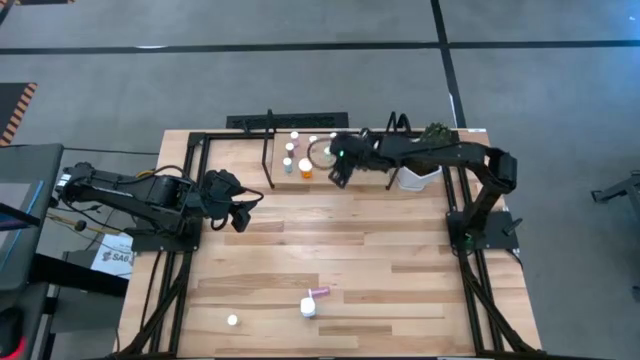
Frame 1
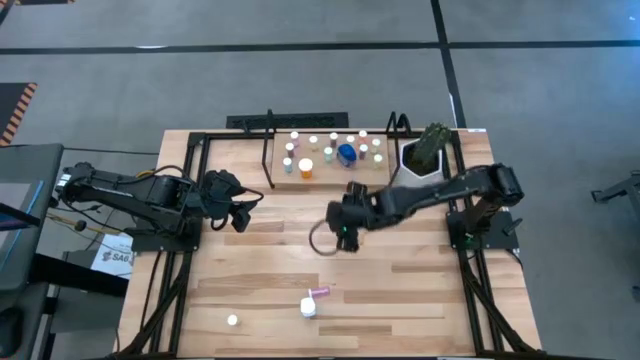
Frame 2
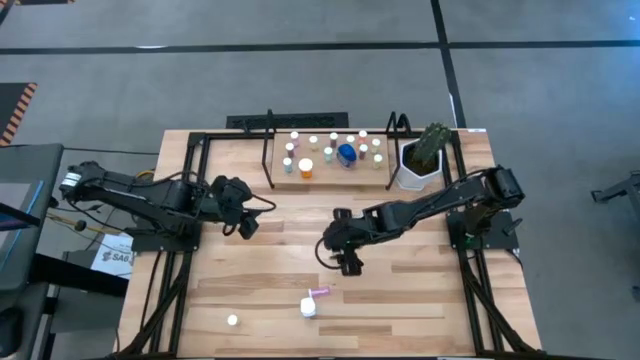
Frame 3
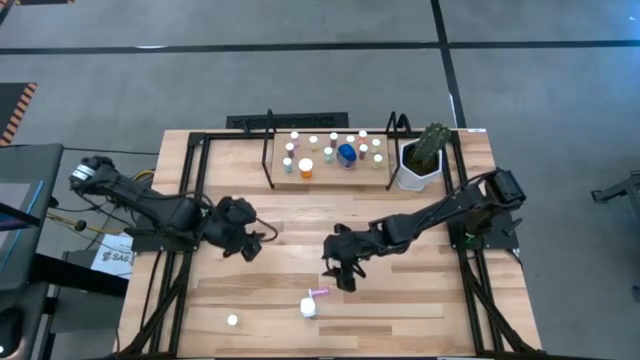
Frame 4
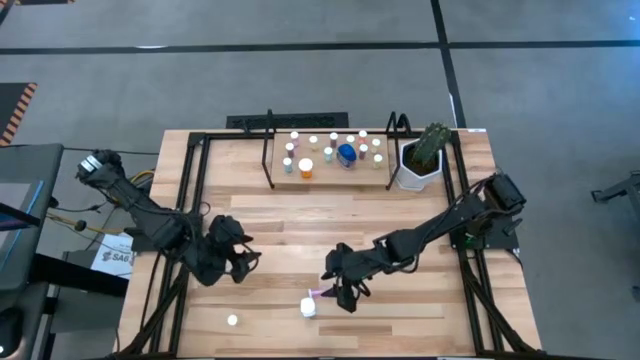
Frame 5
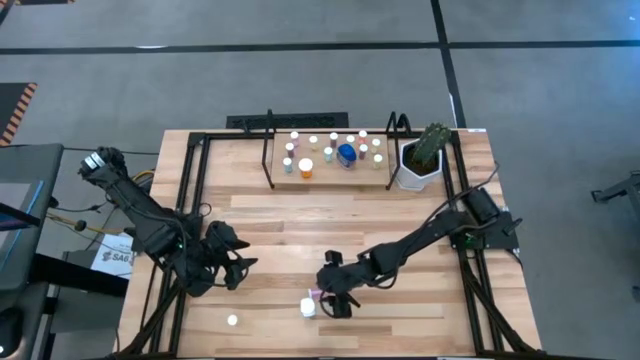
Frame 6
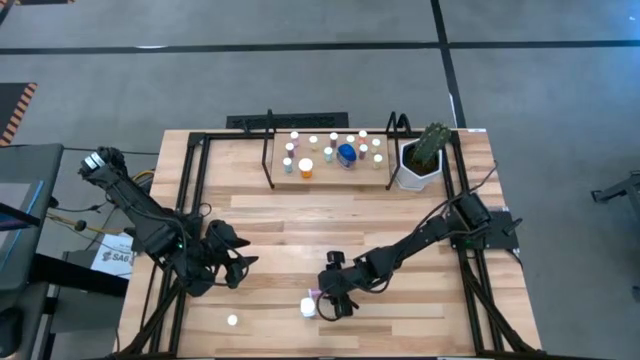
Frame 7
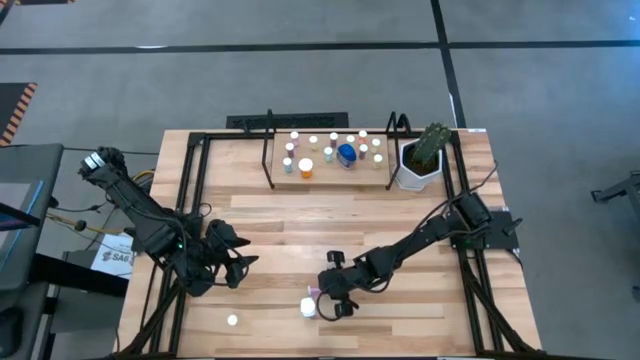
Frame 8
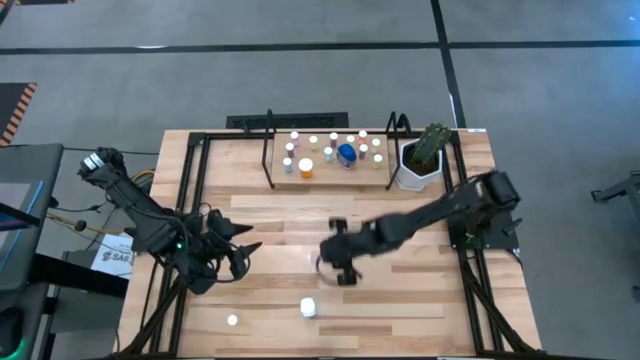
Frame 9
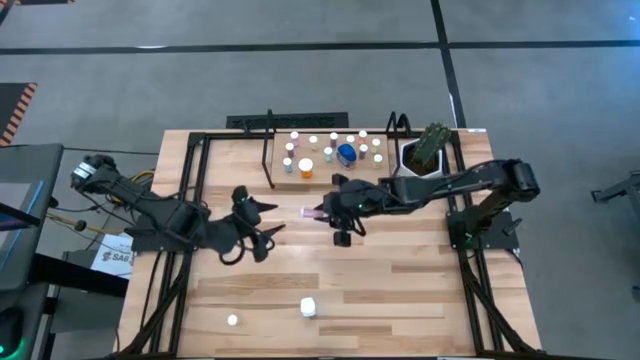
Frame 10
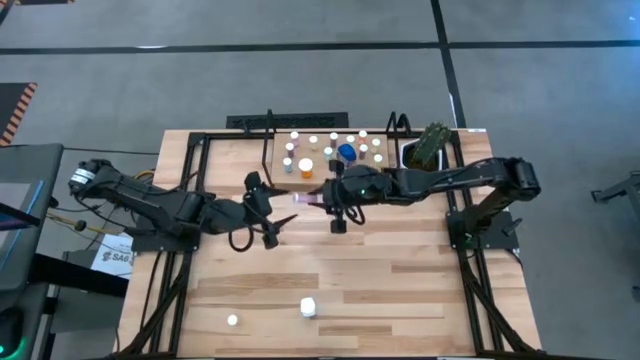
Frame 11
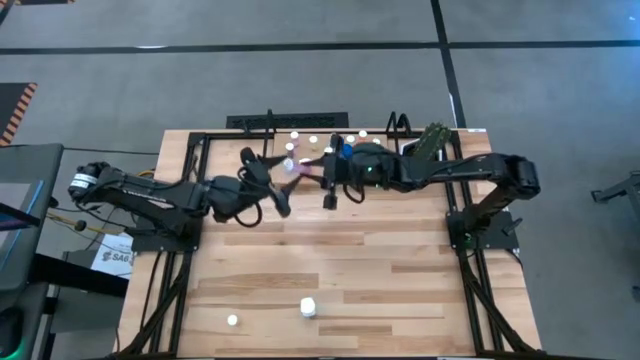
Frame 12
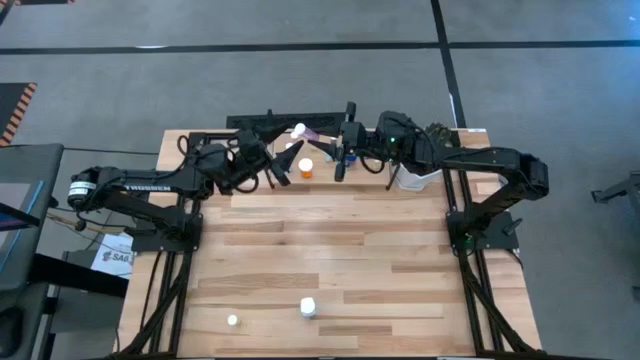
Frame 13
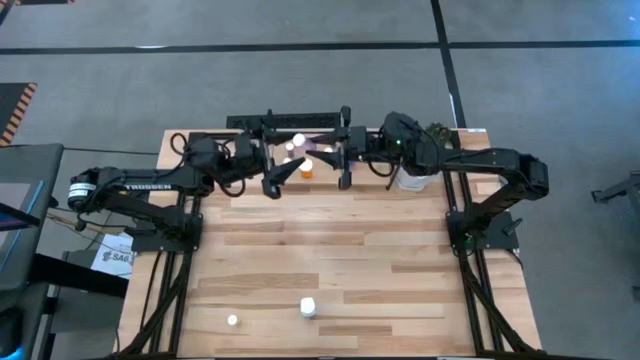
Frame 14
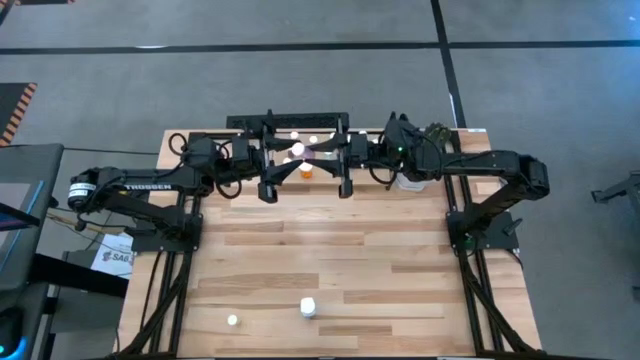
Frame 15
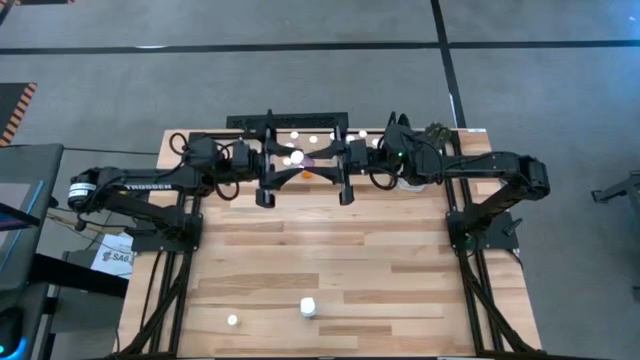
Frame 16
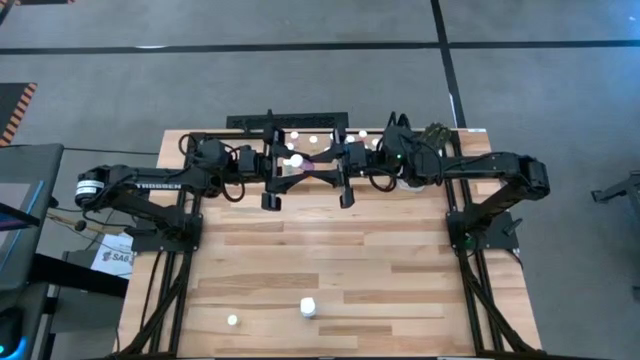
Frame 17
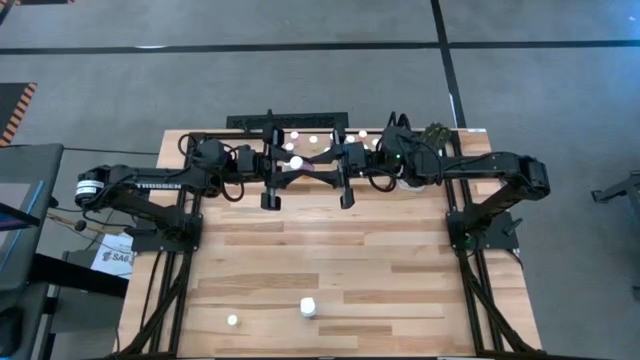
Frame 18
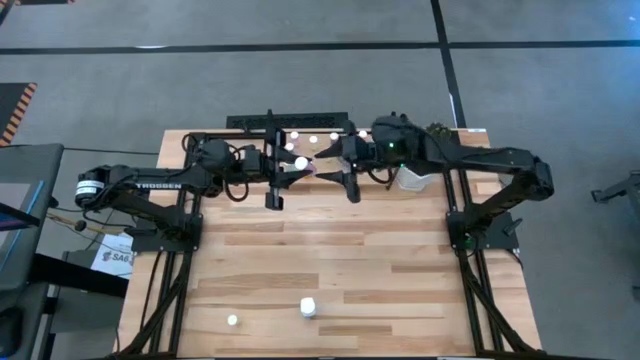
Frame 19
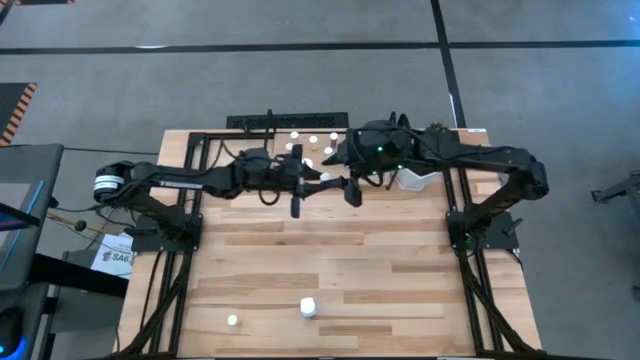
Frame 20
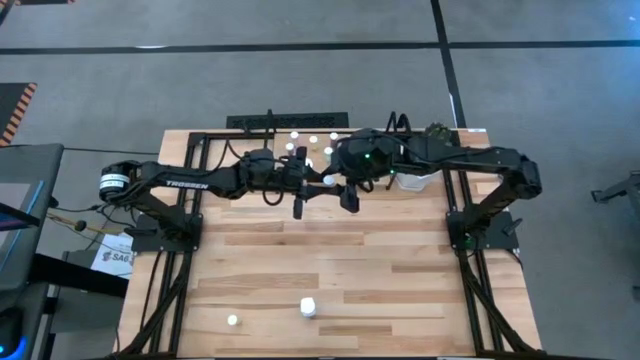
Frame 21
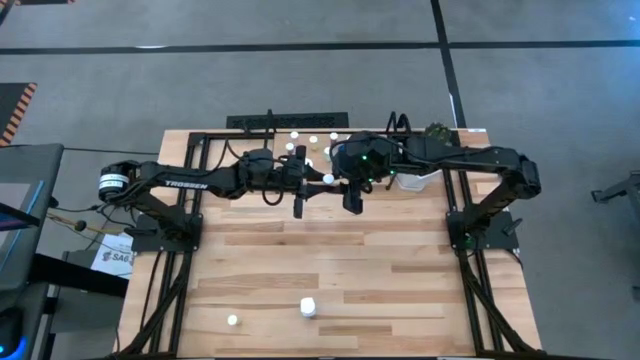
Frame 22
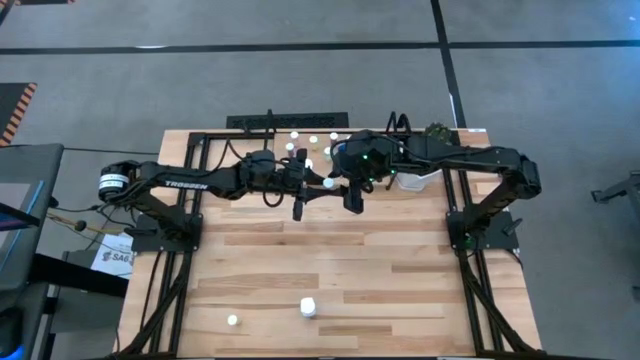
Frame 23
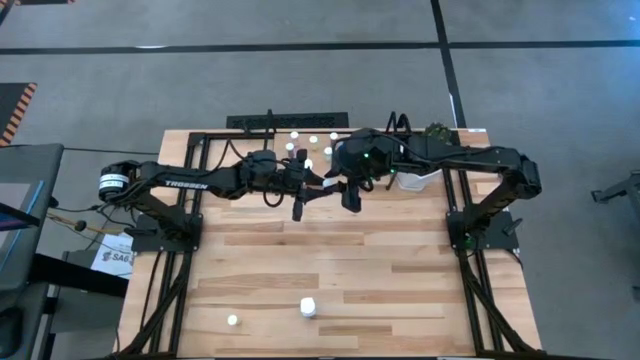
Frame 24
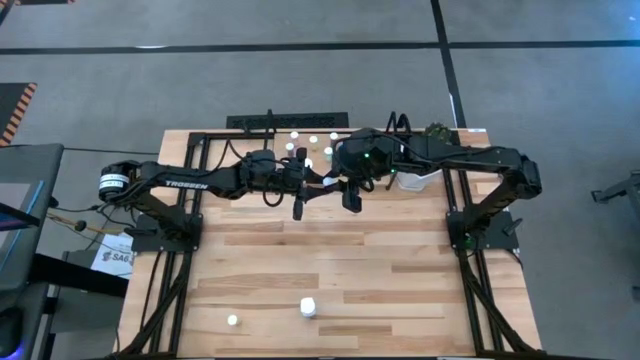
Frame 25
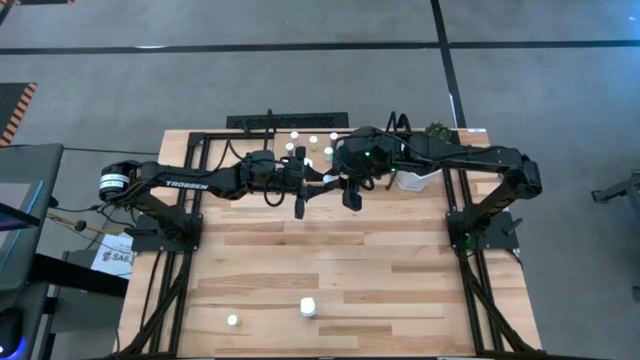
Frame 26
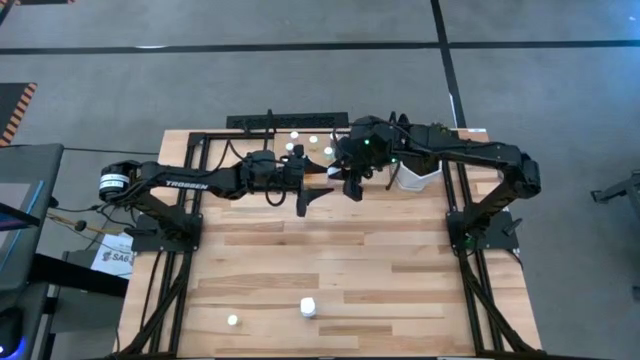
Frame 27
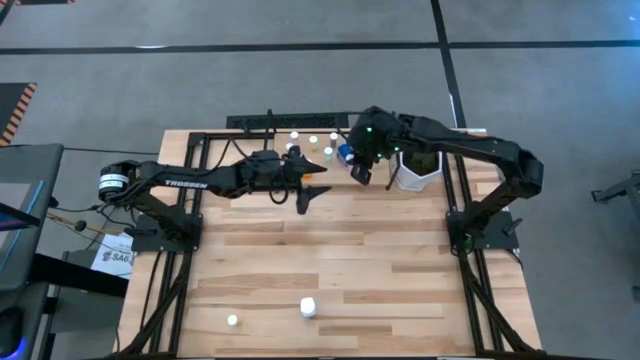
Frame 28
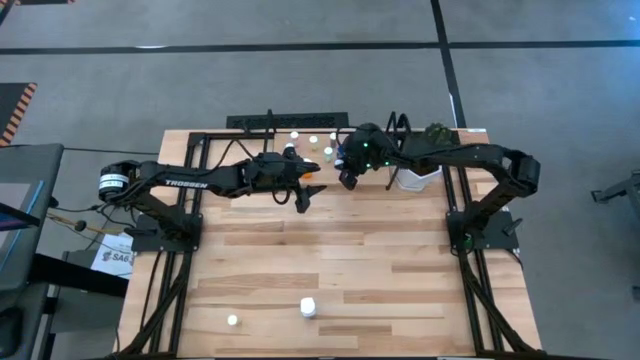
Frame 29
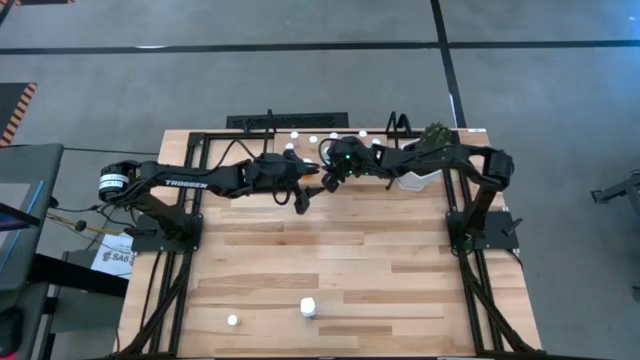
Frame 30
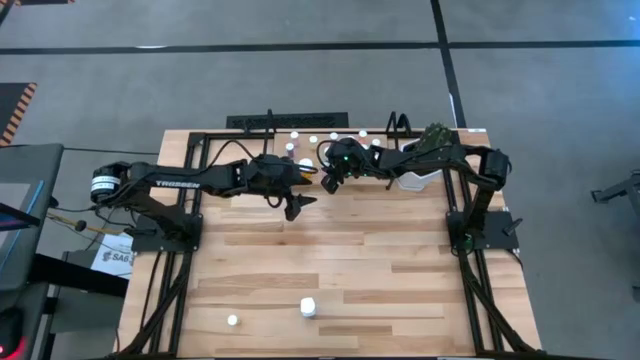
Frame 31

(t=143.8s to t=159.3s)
Task: Pick and place medicine bottles onto shelf by color
Put the pink pill bottle on the shelf

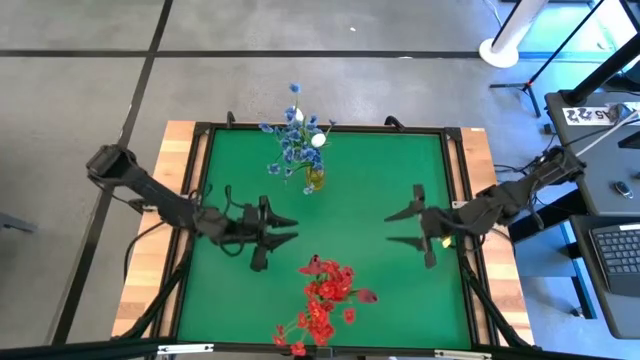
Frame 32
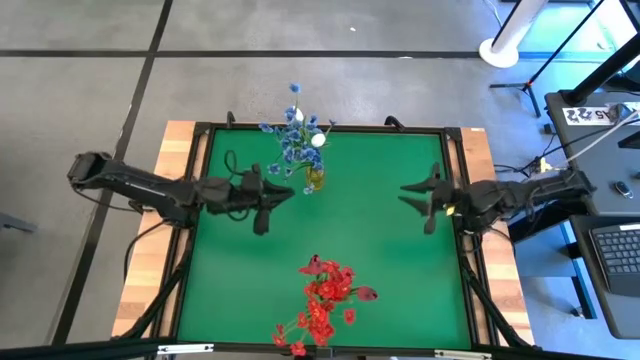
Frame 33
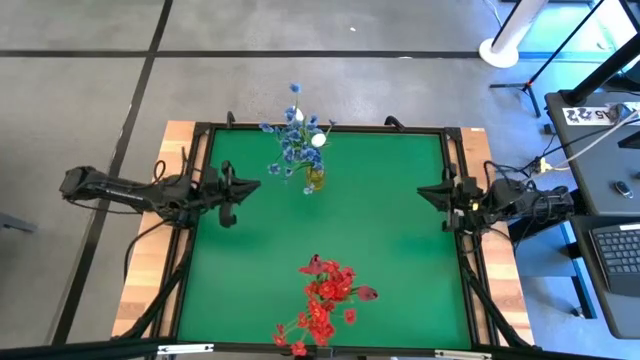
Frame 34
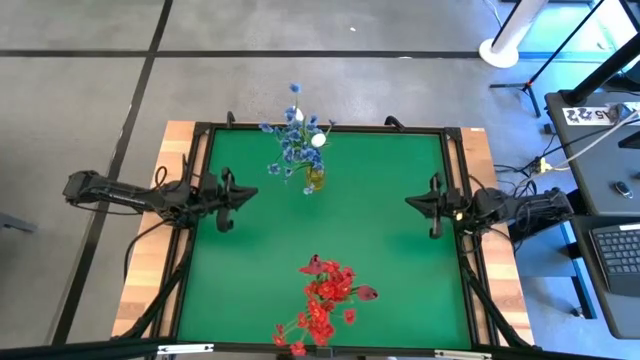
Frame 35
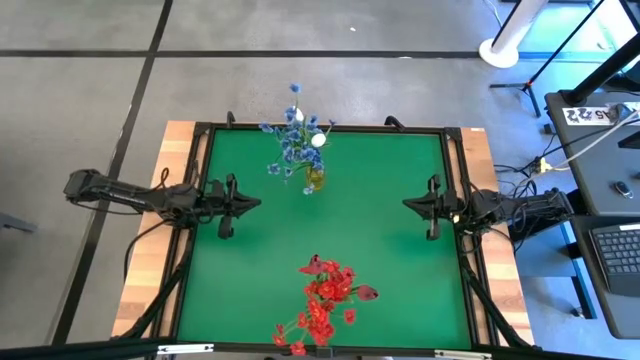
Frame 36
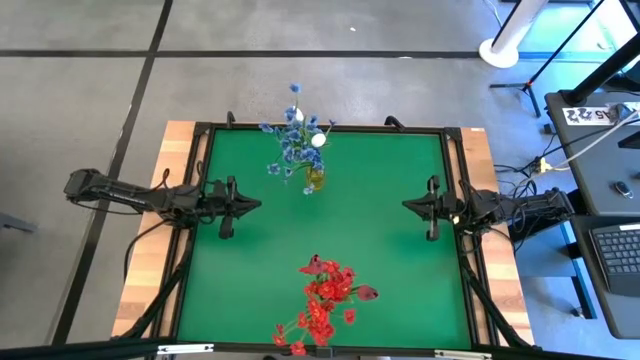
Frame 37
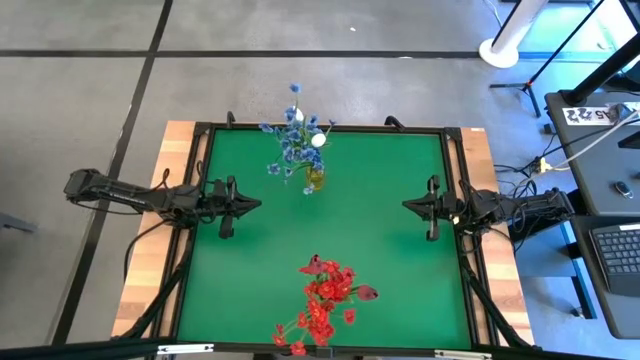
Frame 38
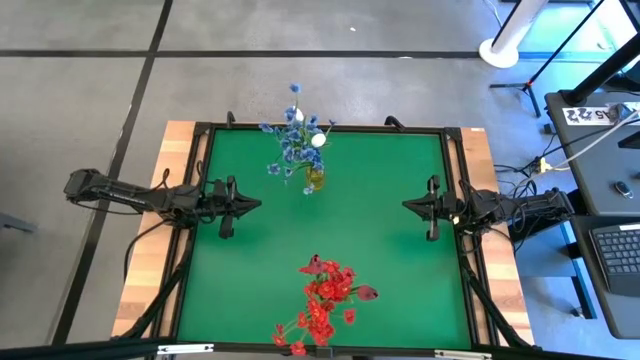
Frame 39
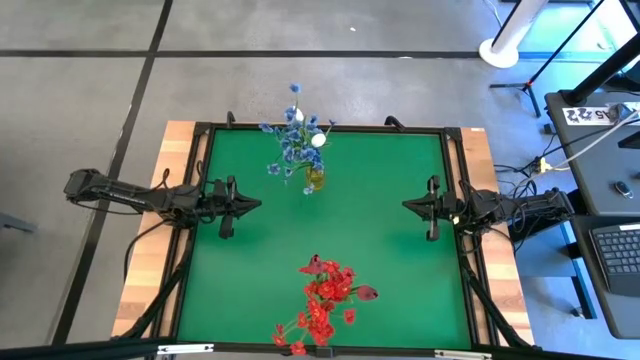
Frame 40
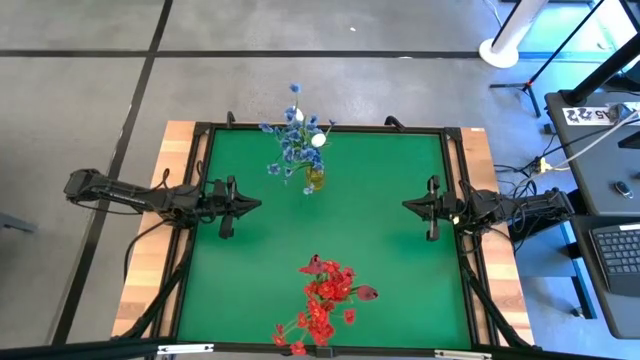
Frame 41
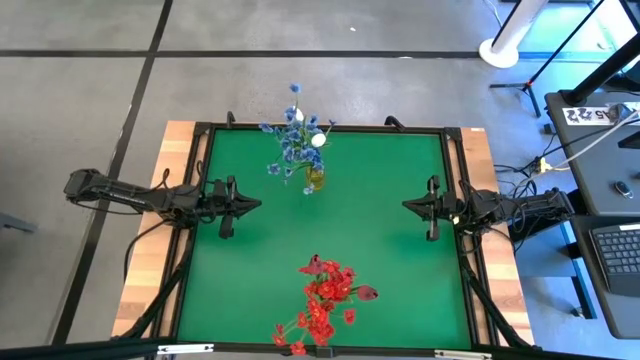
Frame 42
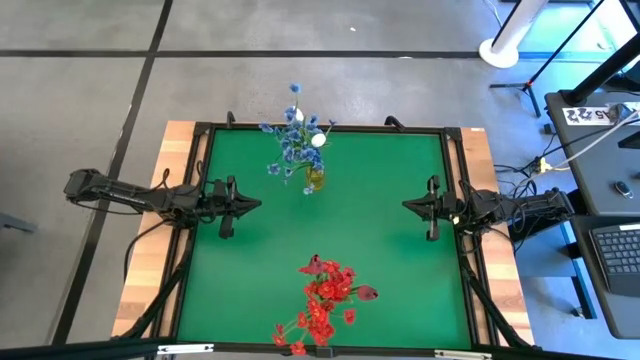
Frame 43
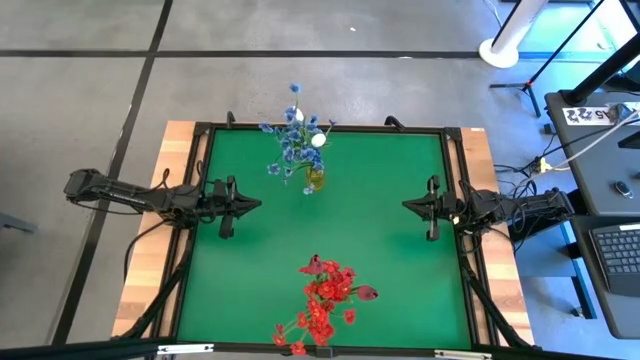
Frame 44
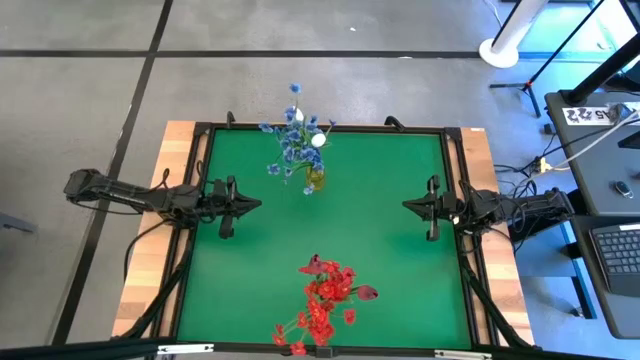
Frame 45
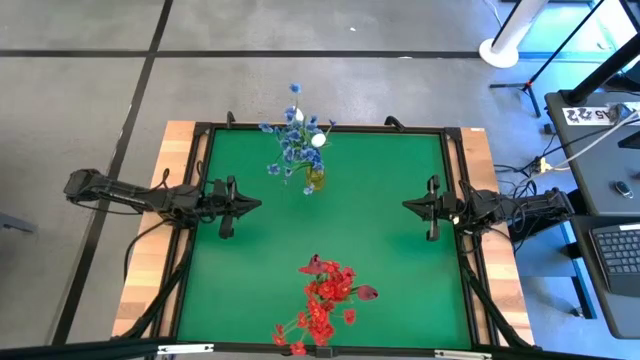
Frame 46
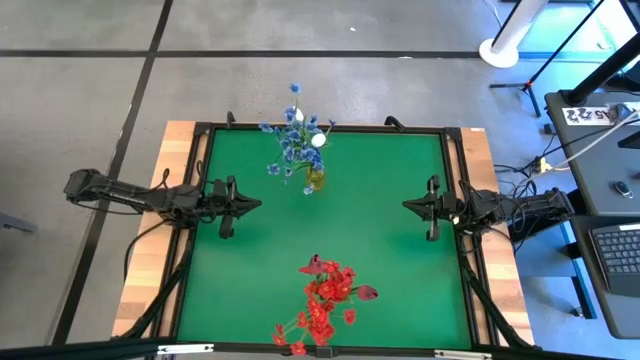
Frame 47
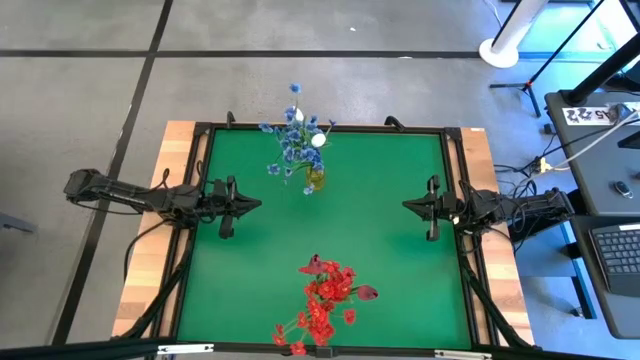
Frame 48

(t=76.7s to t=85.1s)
Task: Sort flowers into vase by color
Return to Home Position
